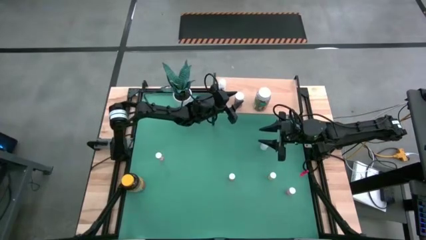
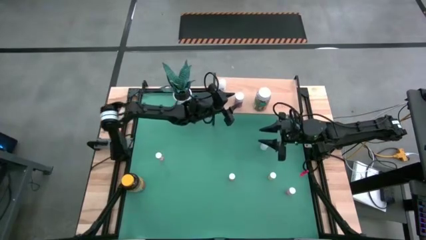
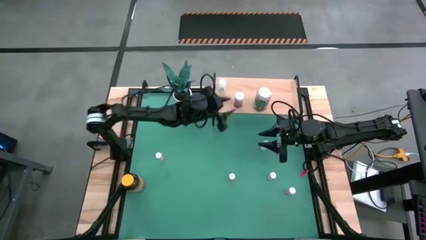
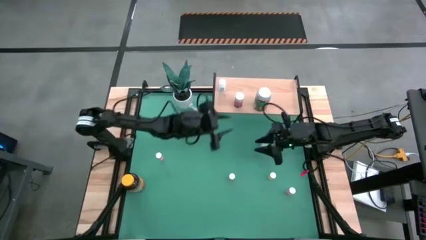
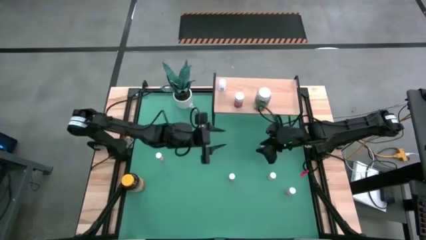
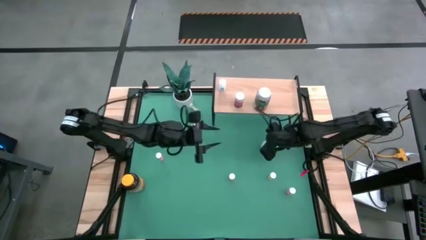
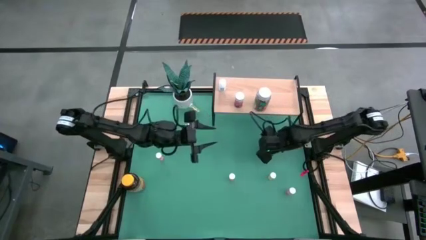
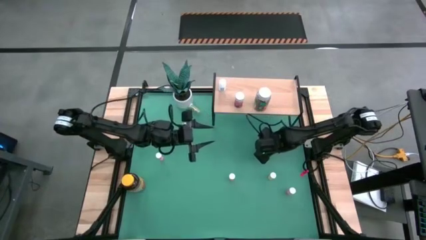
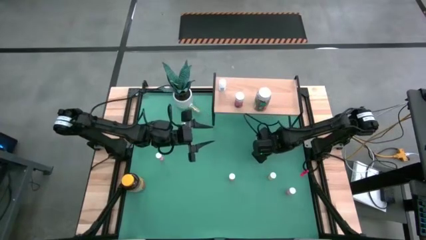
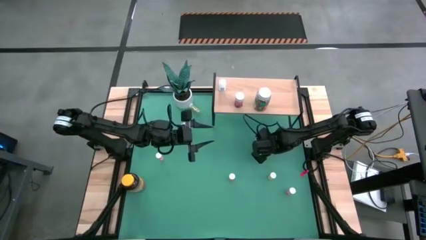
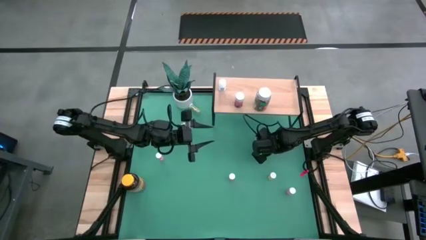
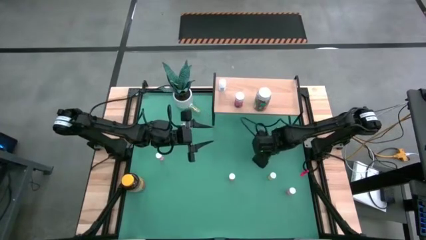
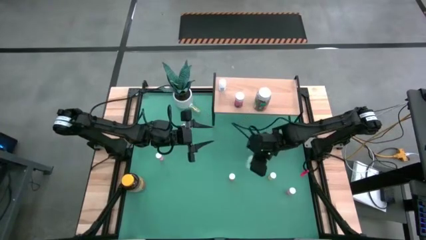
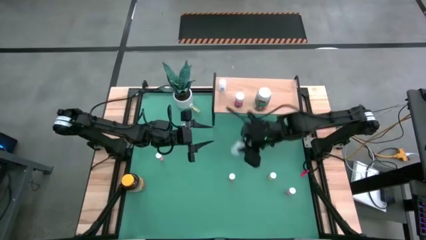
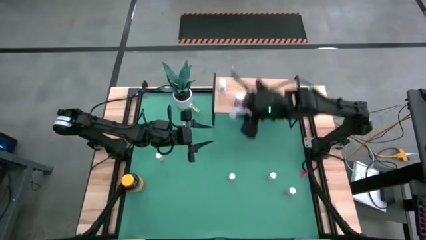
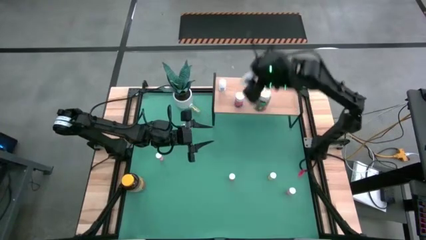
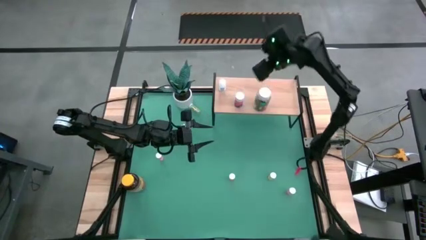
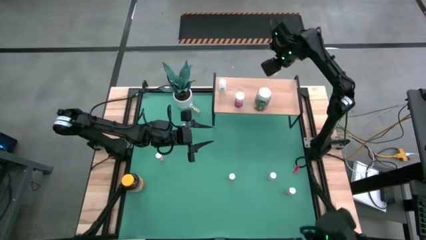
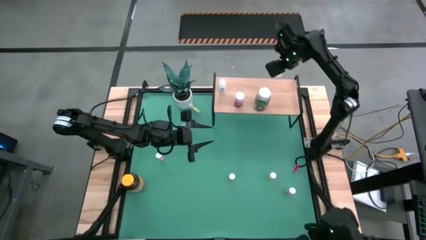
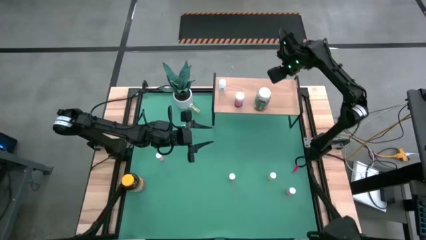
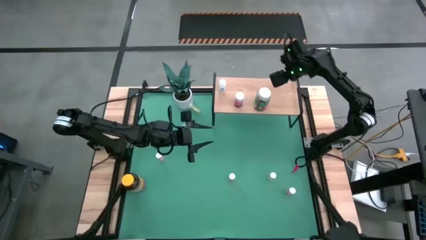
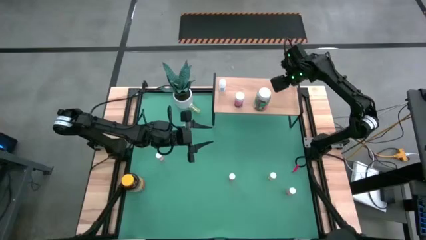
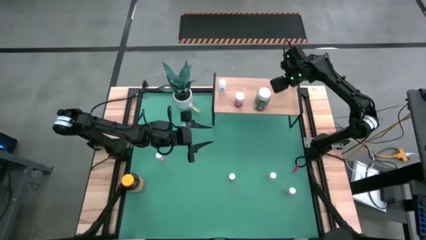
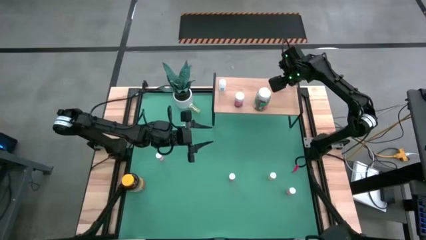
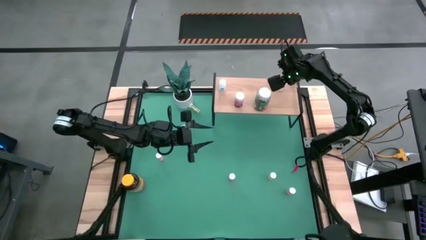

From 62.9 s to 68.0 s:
Task: Pick and place medicine bottles onto shelf by color
Put the white pill bottle on the shelf

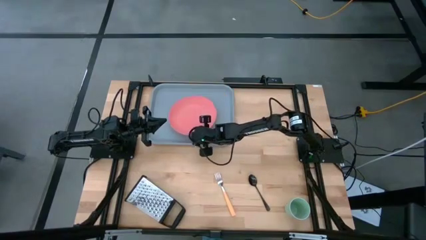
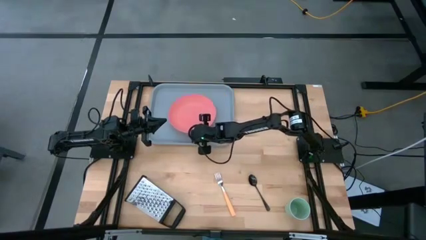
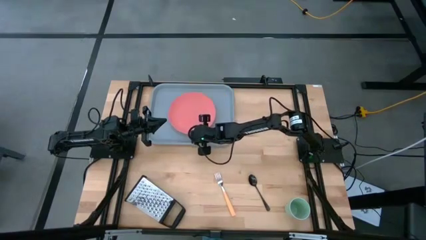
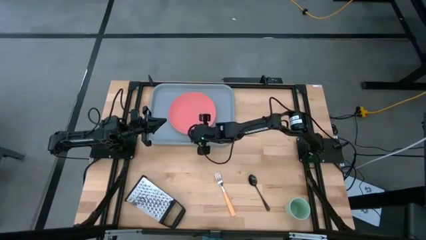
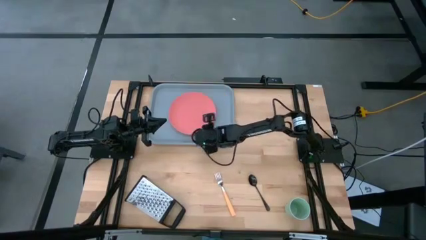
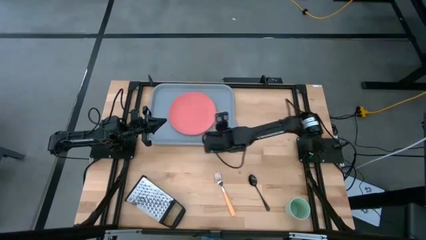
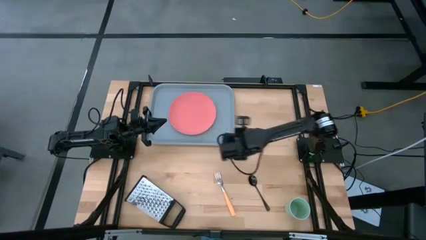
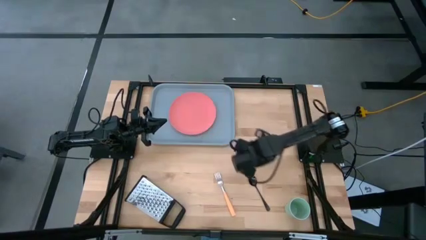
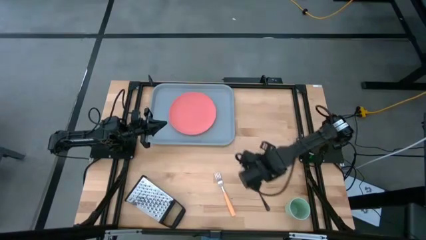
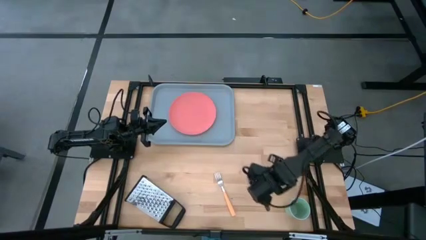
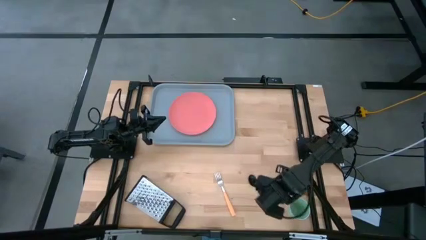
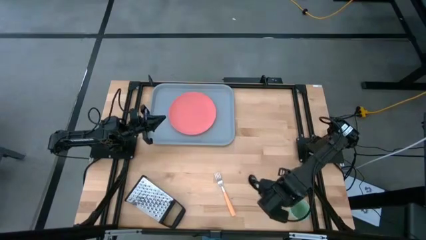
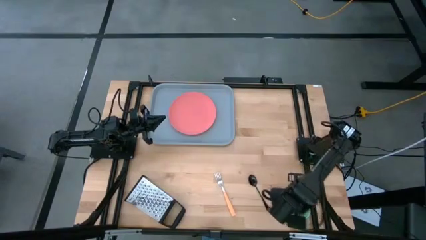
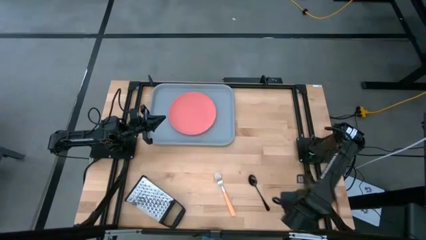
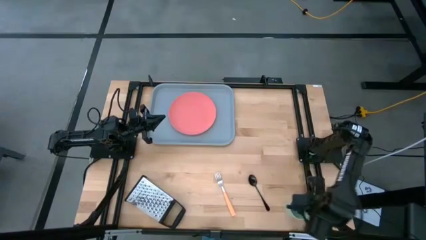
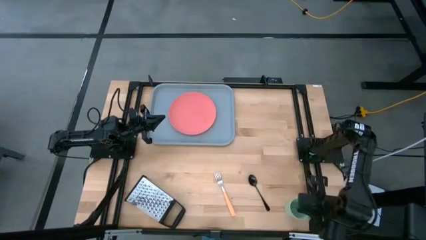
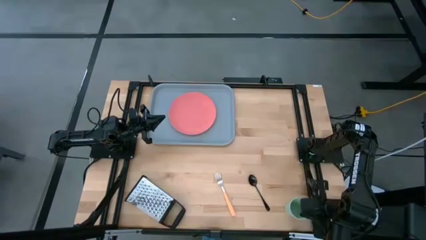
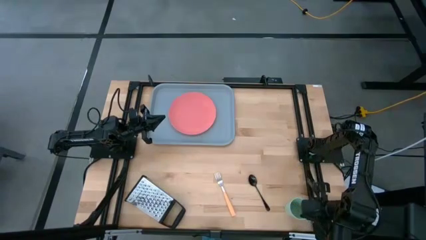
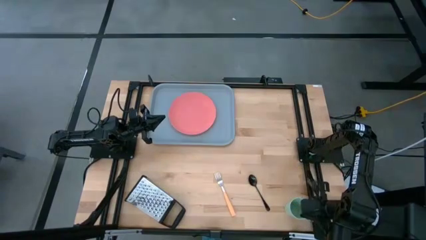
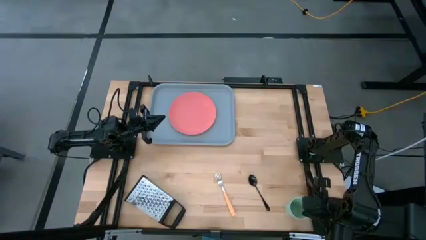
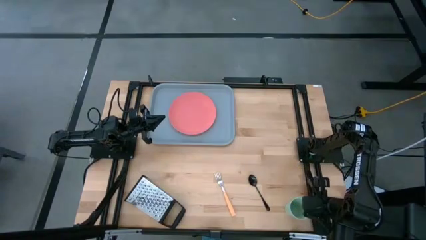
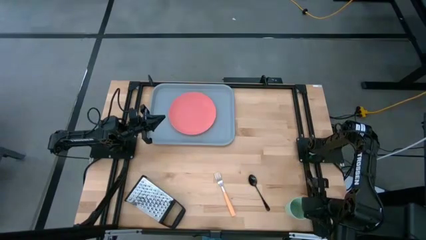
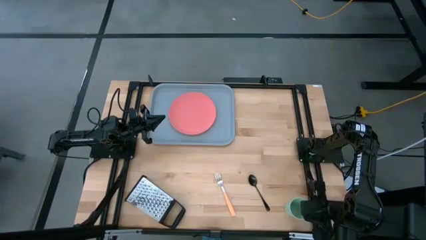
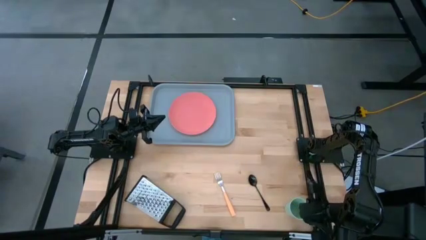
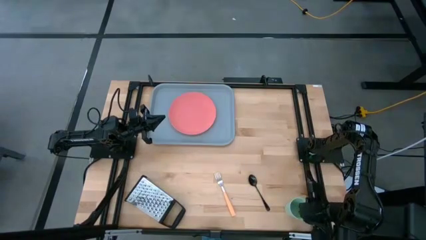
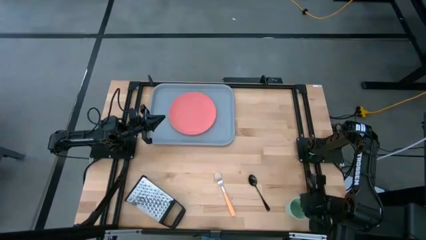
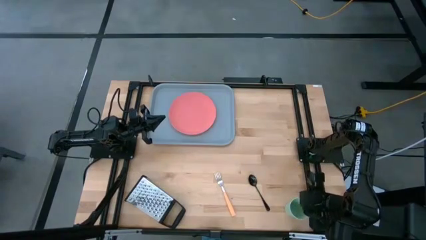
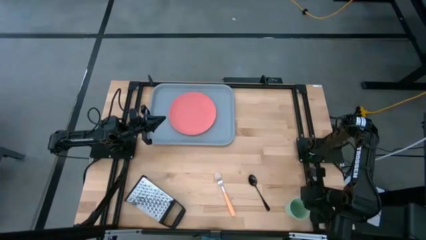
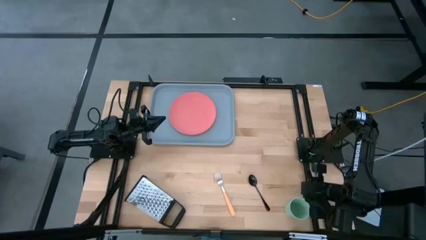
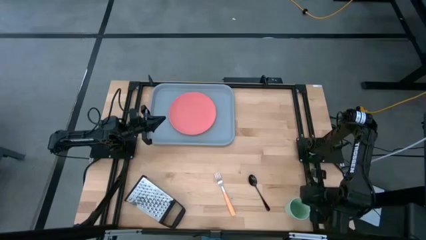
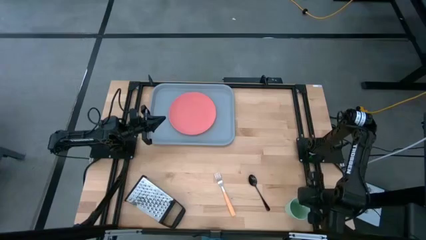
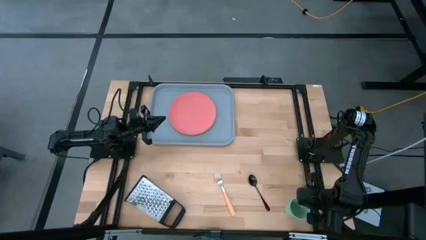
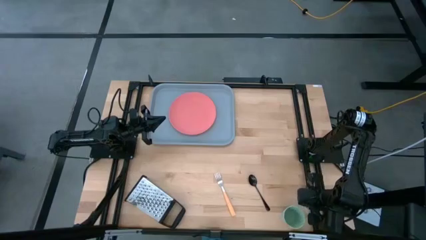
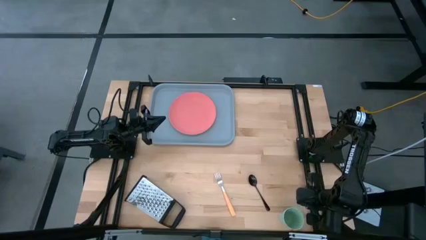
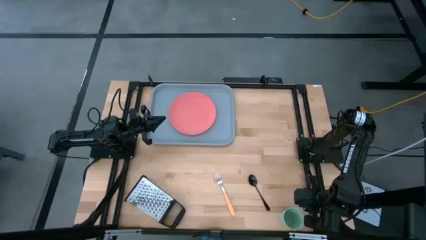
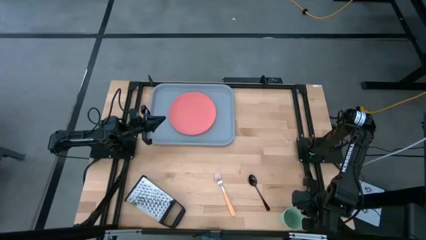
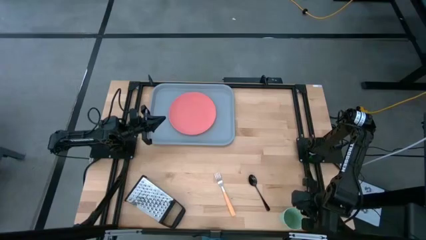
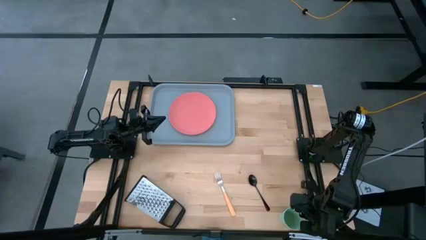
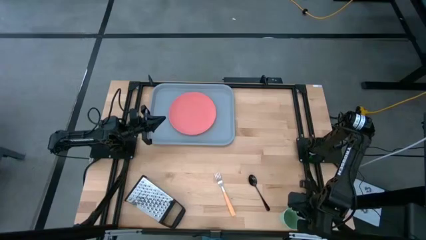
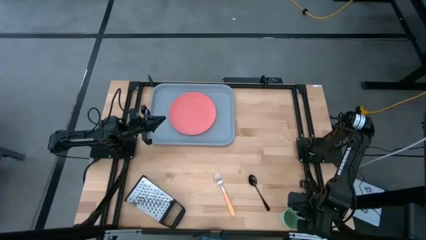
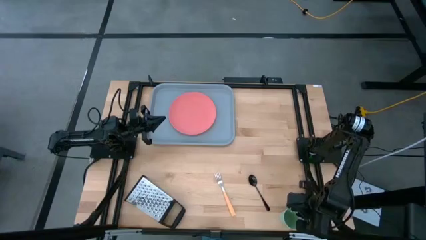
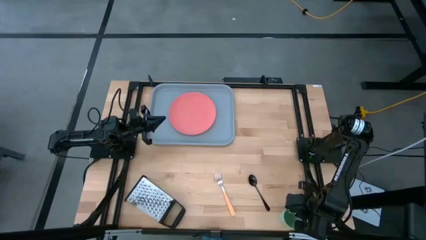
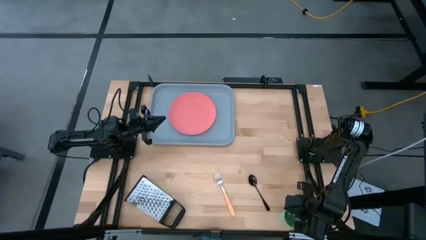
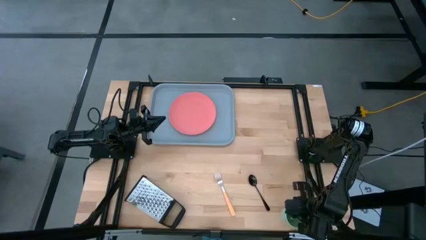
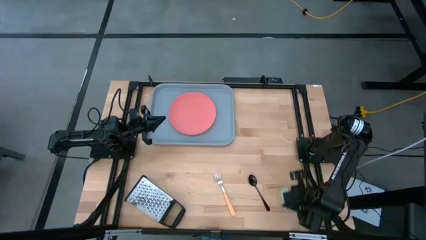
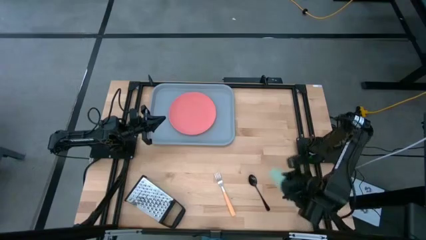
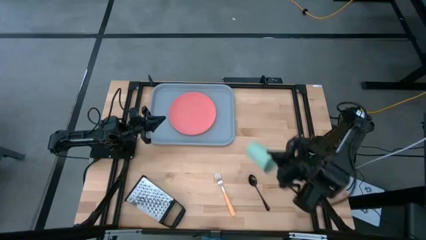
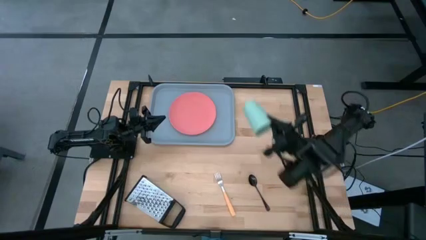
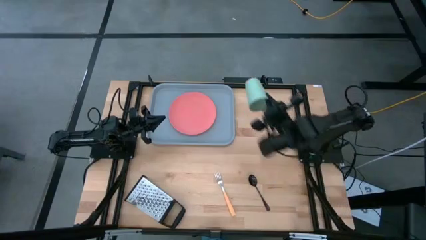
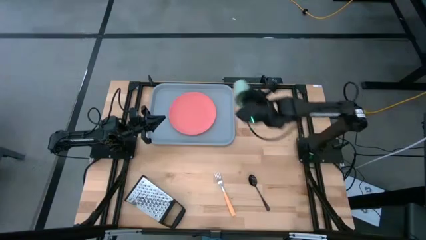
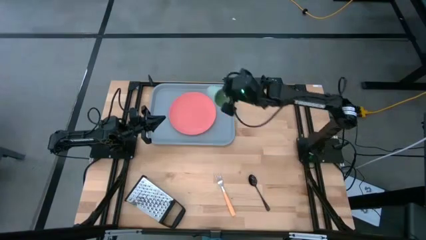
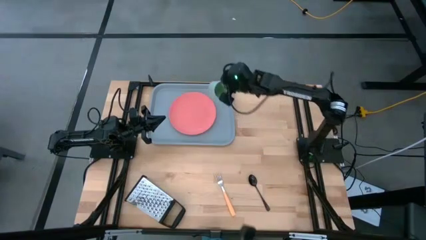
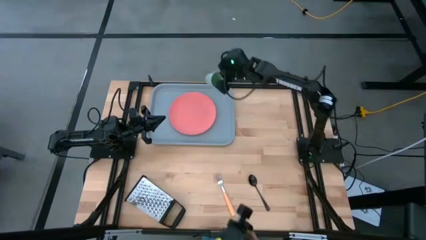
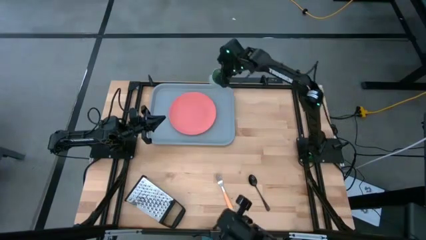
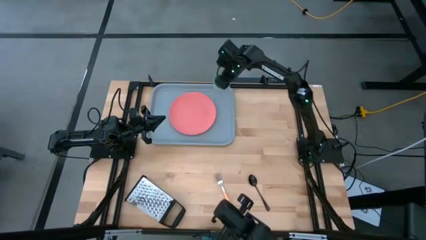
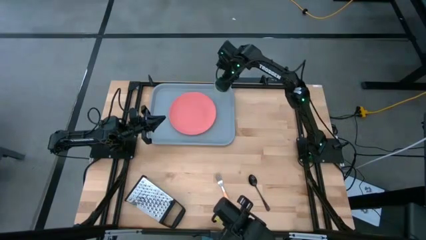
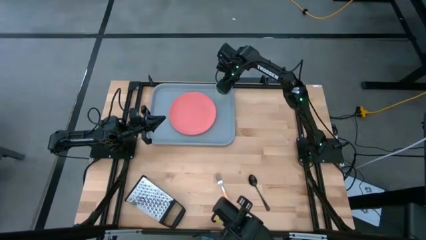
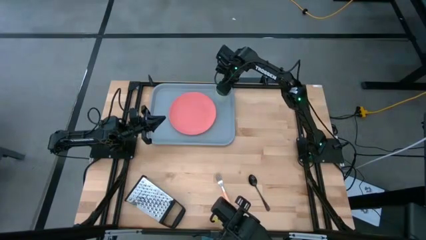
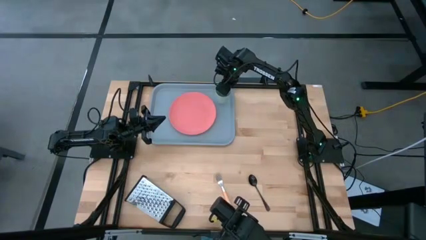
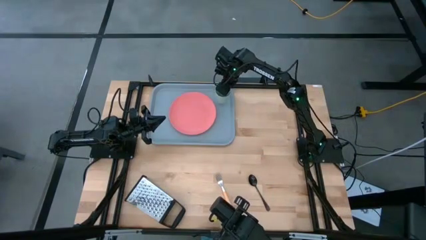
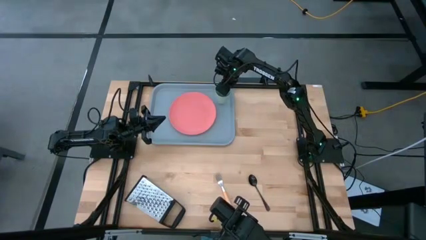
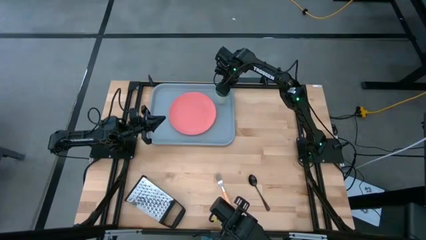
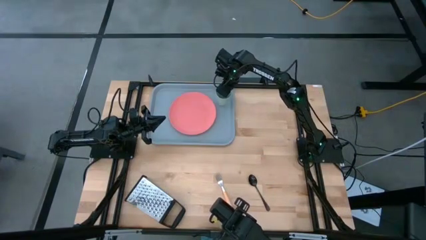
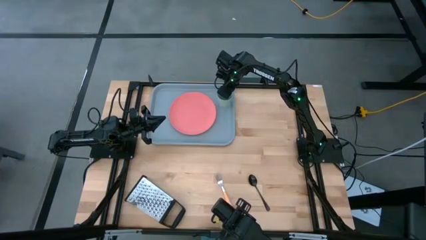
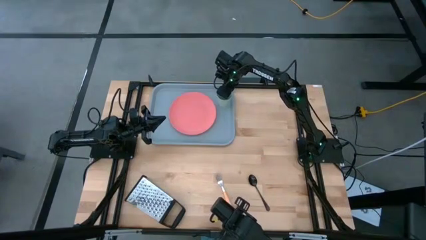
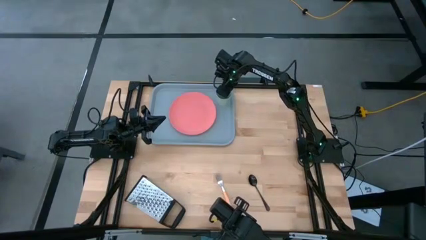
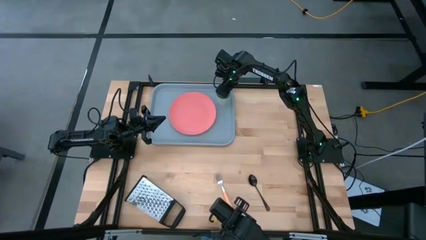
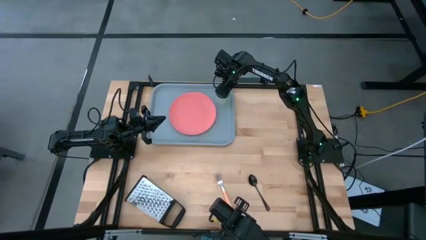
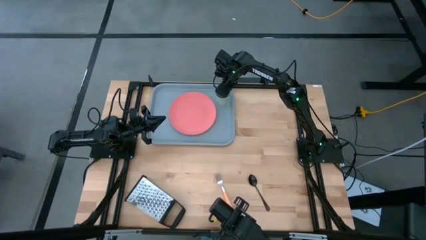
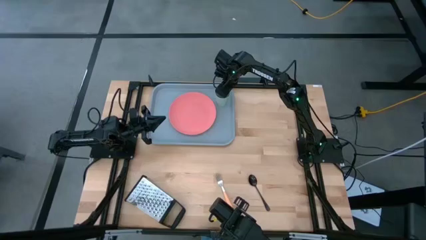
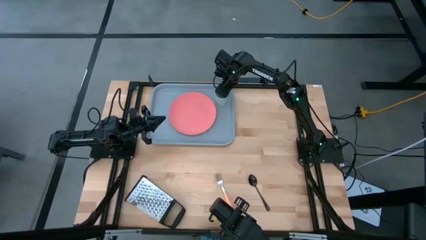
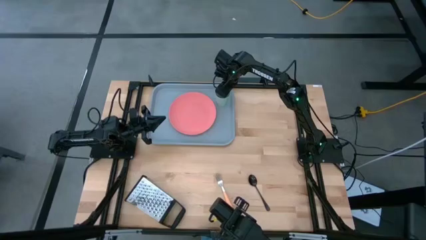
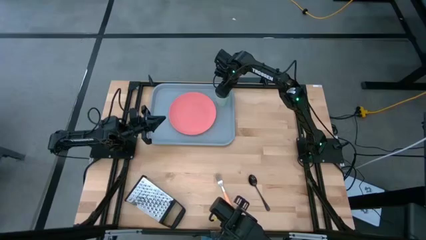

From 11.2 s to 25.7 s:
Task: Pick and place plate/cup/fork/spoon on tray
Put the green cup on the gray serving tray
